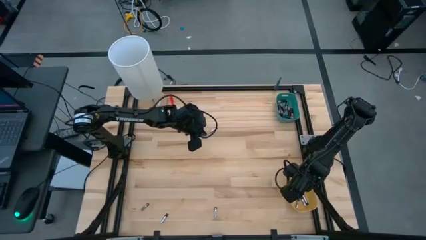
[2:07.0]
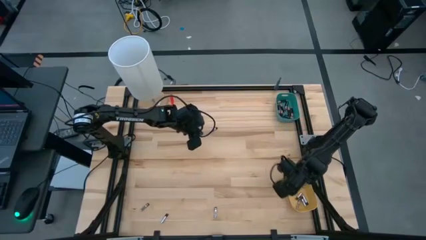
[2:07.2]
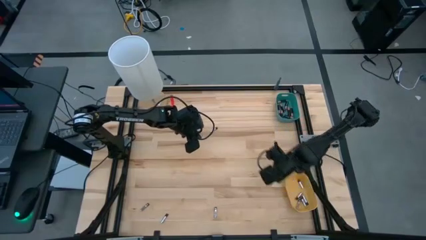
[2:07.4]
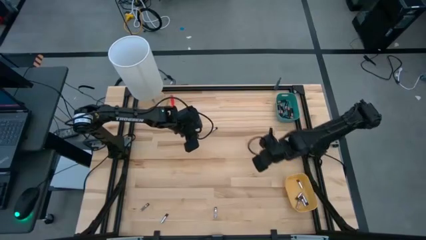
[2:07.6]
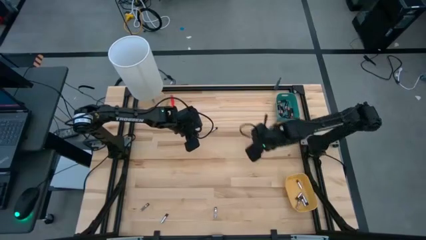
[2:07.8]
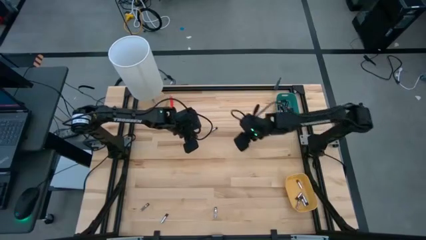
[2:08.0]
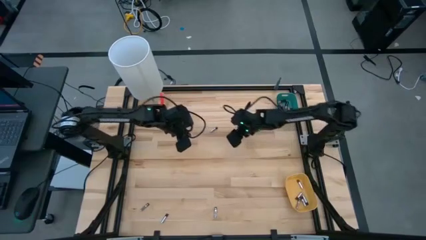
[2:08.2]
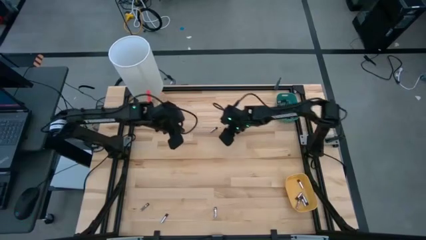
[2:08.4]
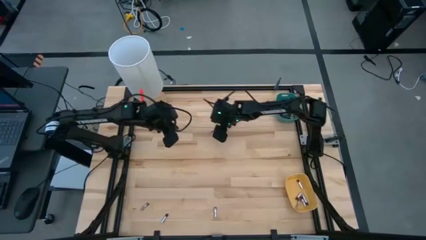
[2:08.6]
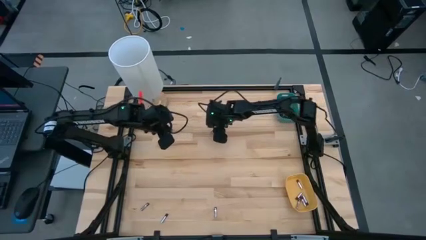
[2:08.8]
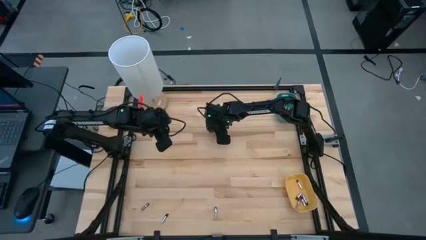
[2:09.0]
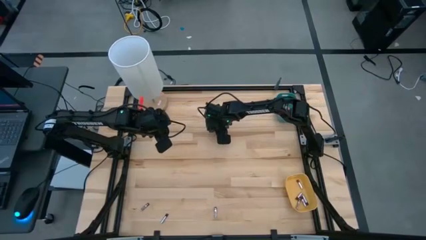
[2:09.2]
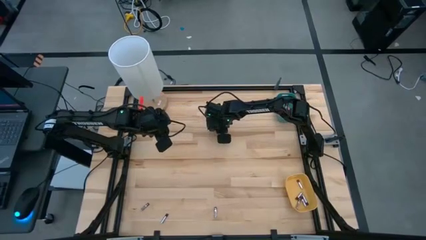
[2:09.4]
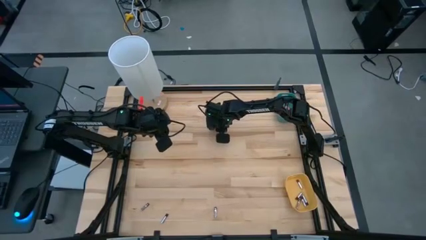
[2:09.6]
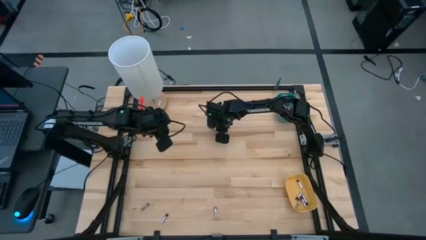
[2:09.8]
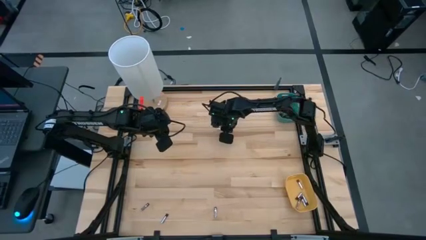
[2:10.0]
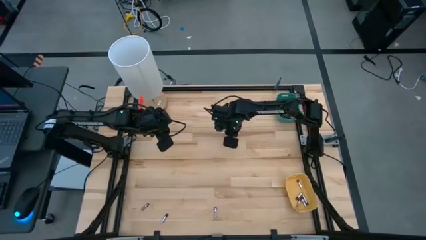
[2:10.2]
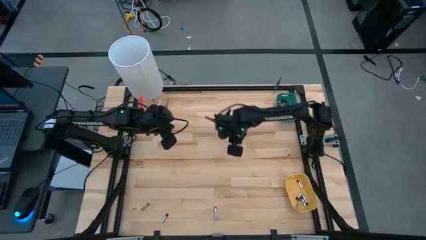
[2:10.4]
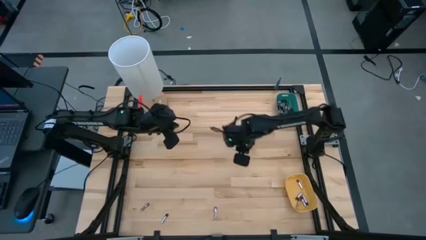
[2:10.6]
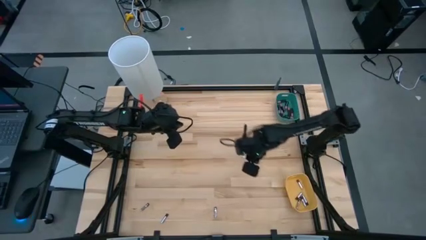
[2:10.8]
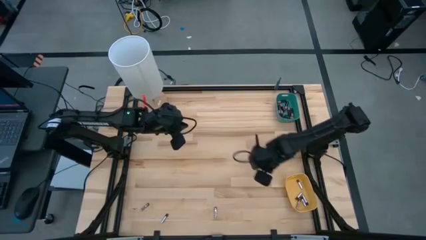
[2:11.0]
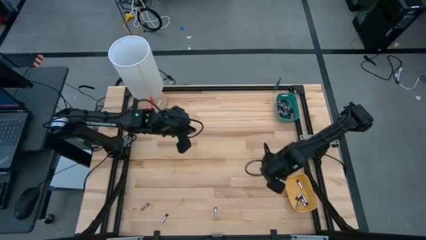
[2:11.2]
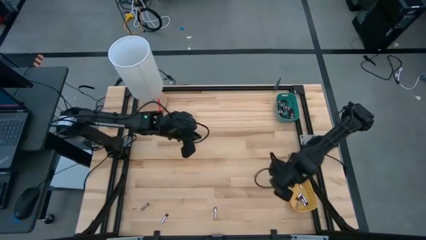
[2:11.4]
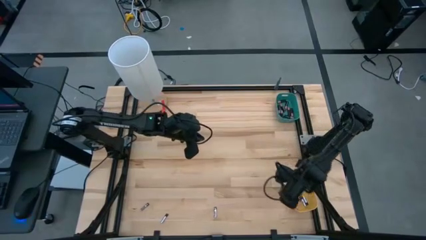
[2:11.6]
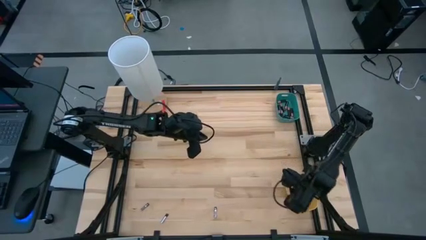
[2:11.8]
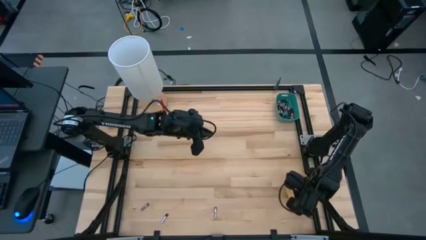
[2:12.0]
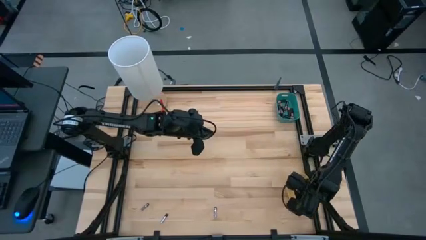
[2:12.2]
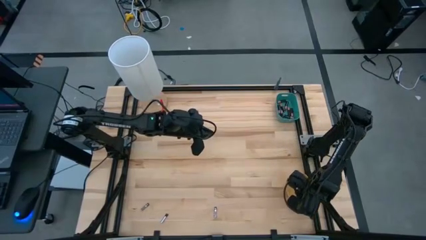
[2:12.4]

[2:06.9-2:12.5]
Task: Sort batteries
Put the silver battery into the yellow bin

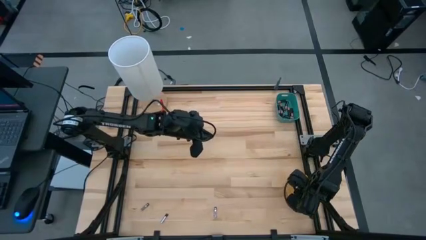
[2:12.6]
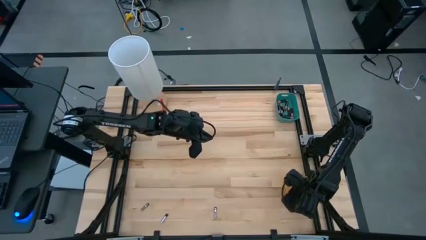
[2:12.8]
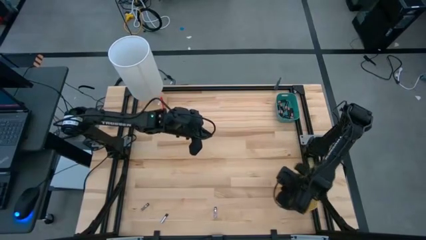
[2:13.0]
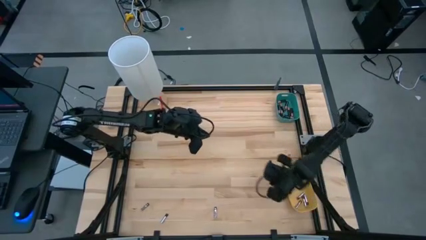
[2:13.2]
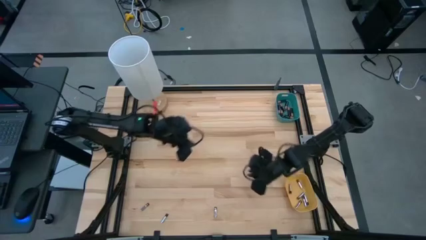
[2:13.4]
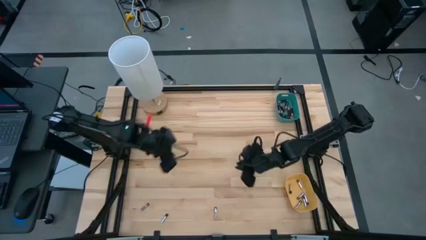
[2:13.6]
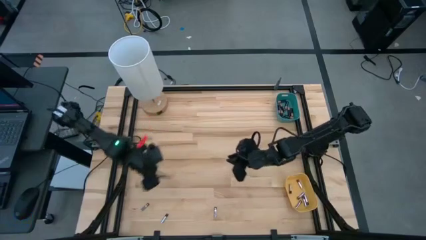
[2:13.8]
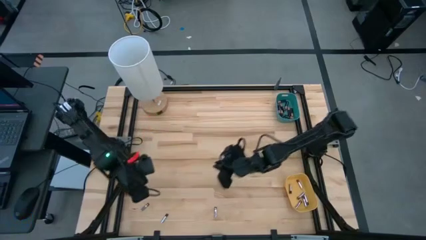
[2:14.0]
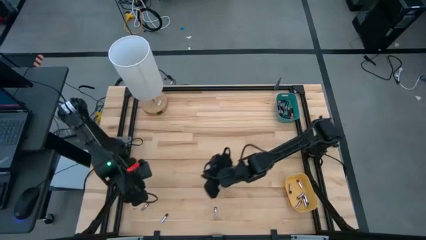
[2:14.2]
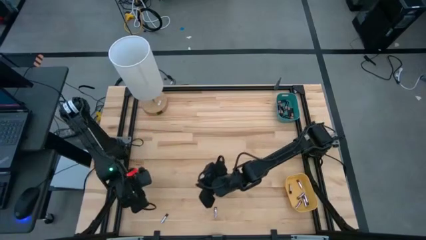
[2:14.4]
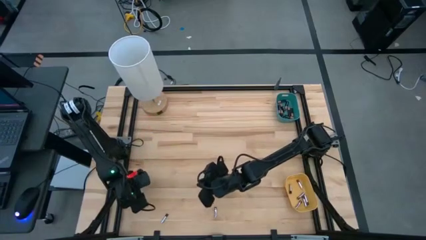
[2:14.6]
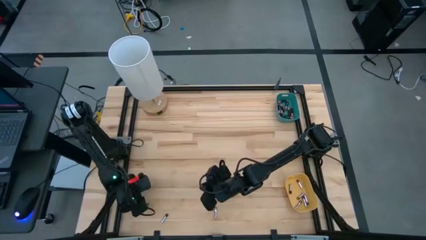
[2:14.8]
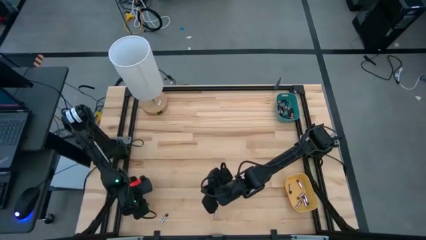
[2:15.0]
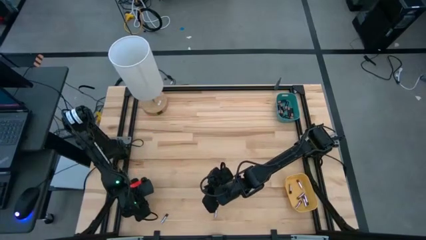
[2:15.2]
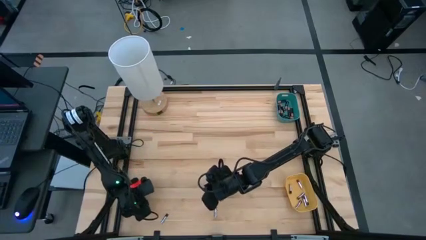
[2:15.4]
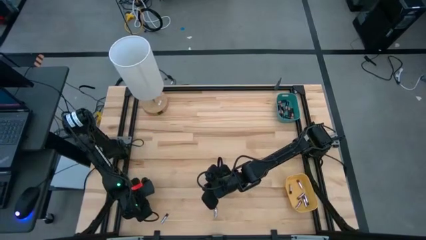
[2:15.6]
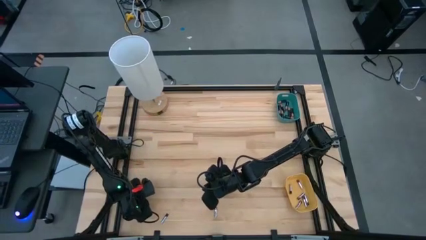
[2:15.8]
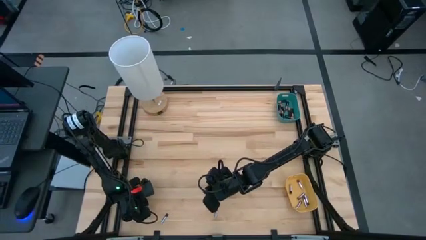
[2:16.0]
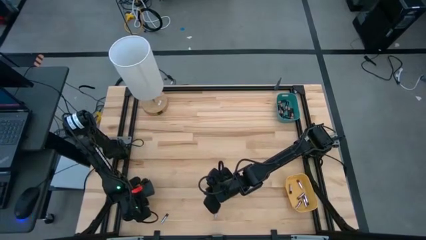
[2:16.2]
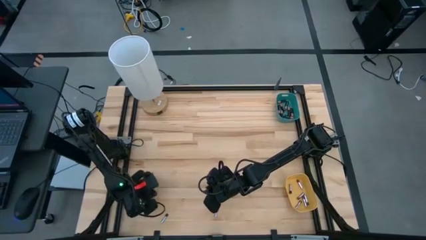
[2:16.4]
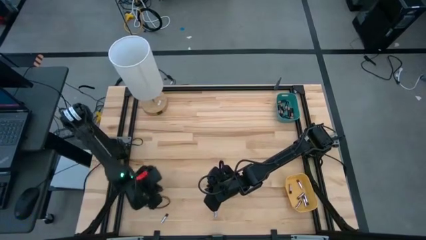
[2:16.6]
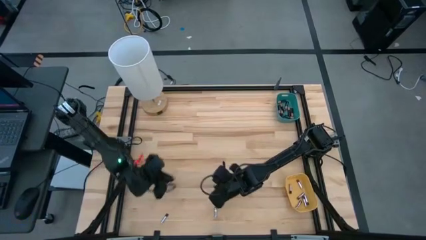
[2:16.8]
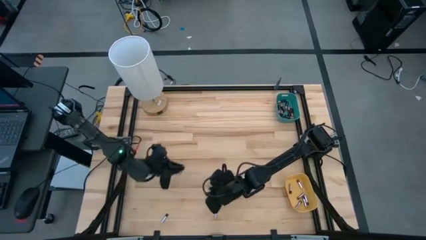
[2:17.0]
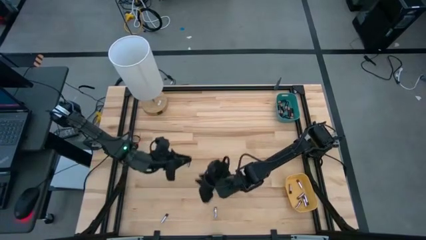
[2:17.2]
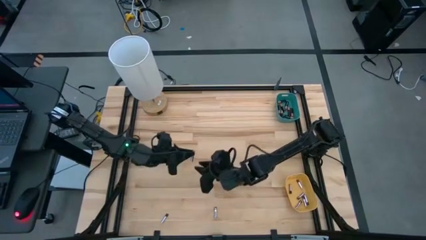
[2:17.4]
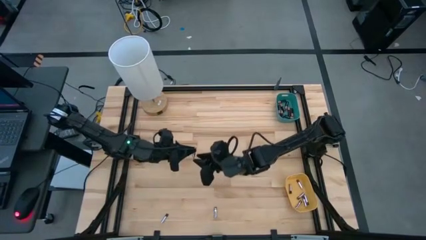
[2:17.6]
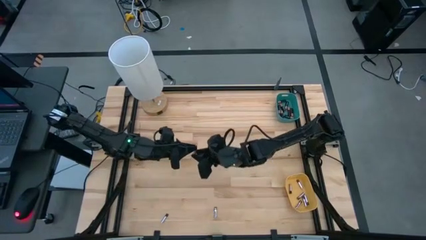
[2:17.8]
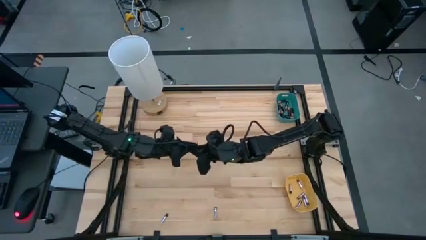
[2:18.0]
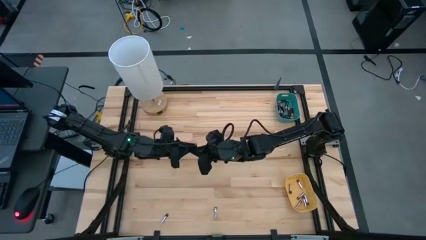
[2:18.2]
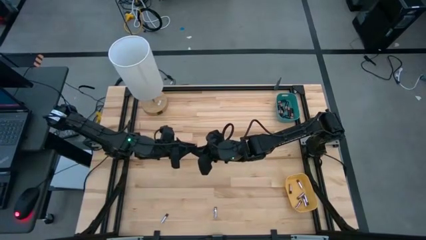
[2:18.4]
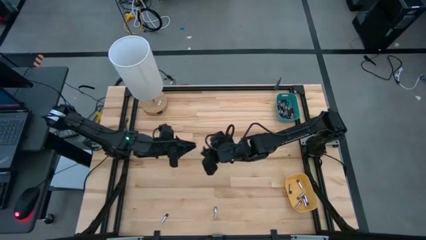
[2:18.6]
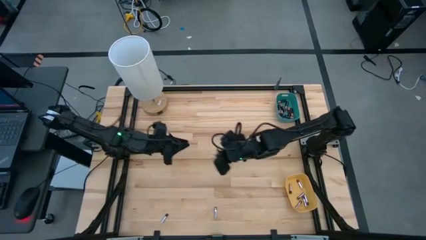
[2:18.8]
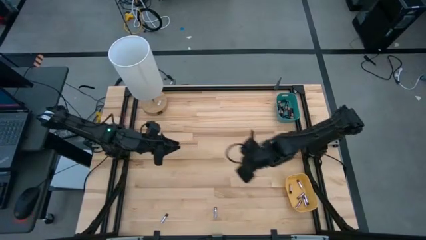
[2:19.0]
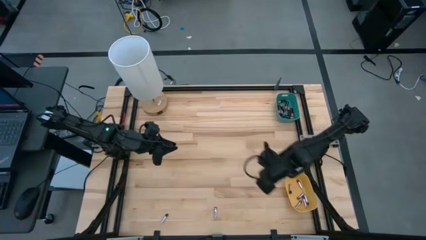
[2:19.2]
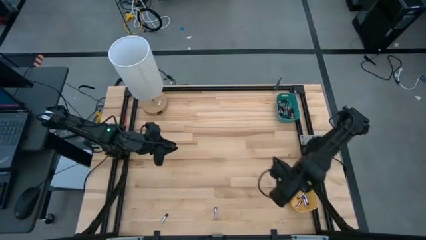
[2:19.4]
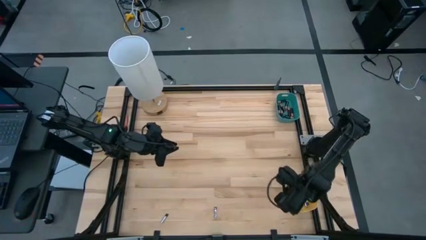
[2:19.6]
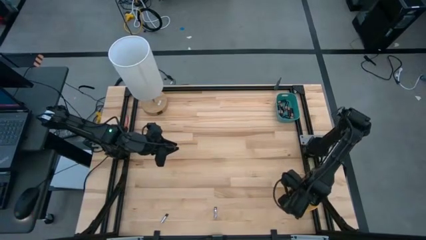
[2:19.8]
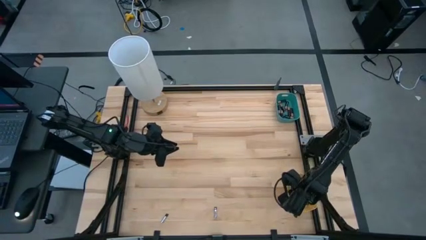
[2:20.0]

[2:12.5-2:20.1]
Put the silver battery into the yellow bin

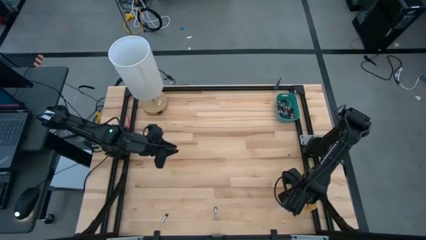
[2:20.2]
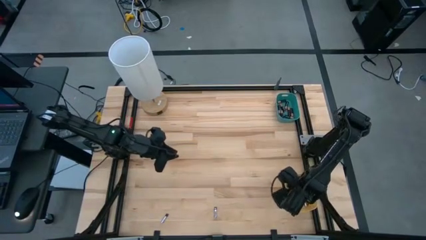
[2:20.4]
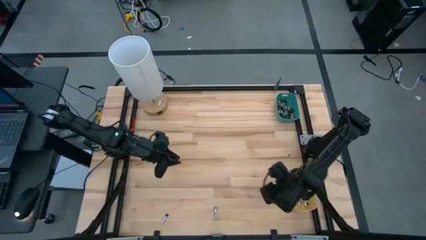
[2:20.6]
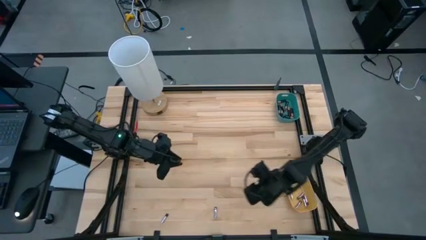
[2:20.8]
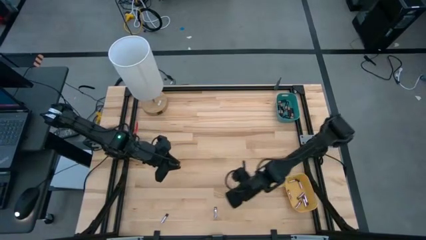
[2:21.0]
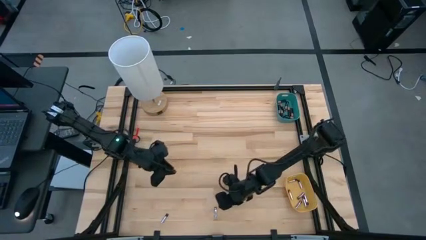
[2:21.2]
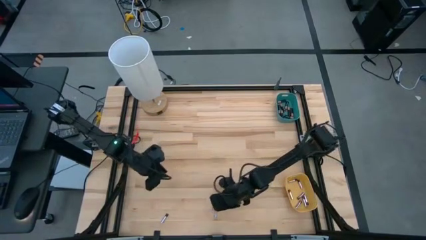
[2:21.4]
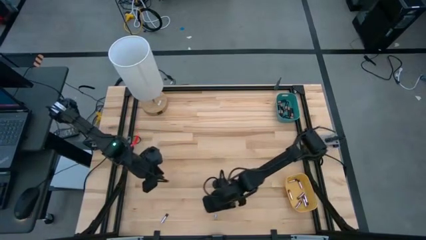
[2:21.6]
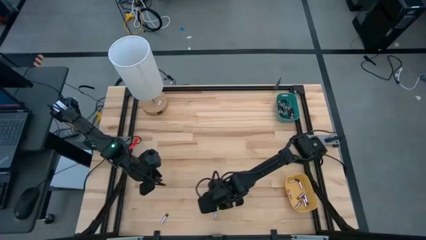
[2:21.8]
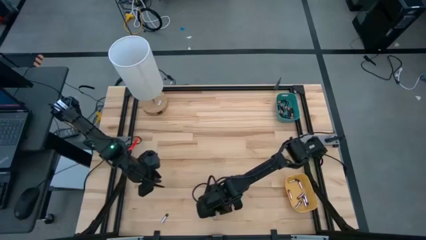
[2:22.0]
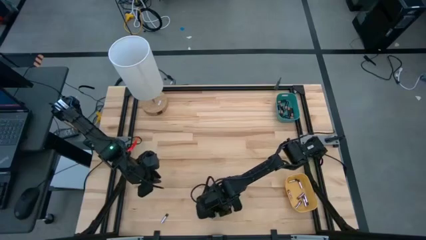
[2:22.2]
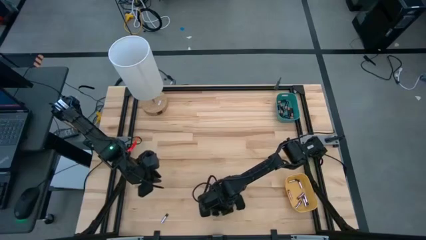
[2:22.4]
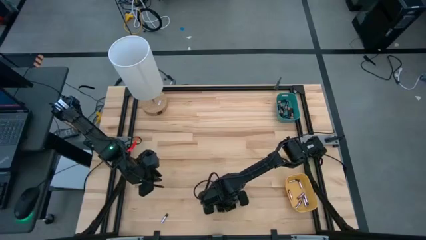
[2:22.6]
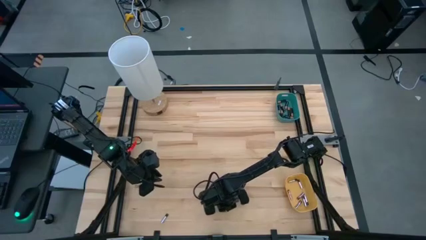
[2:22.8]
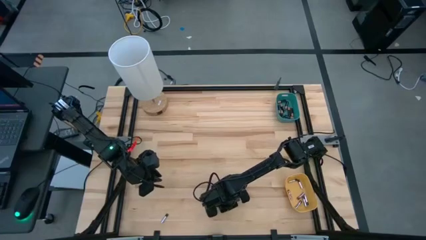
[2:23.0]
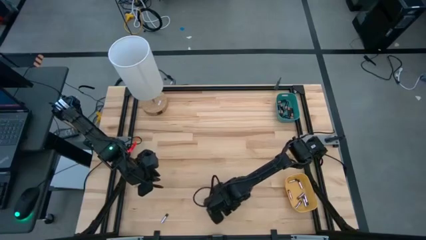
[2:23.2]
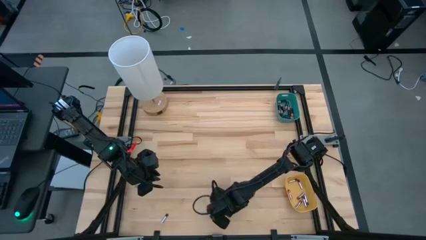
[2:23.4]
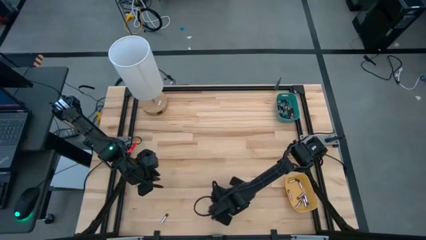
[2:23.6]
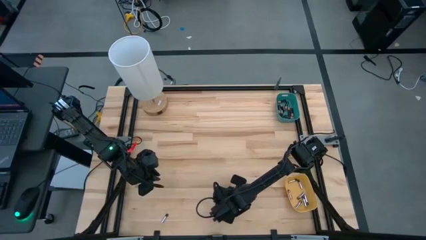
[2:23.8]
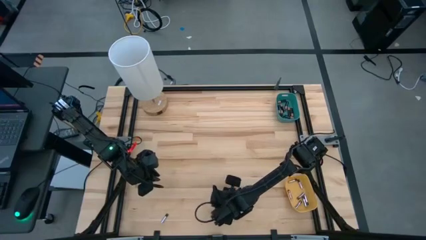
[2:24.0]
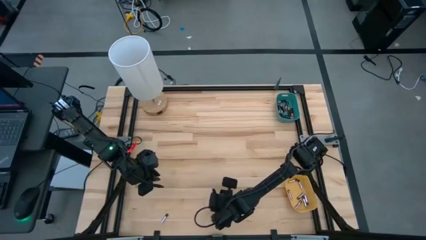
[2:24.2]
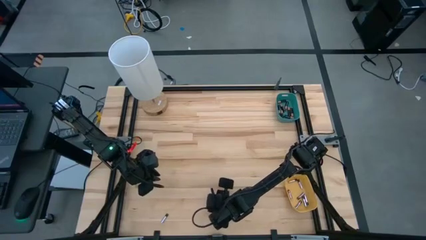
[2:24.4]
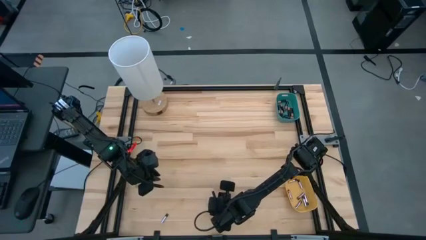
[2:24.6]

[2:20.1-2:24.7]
Put the silver battery into the yellow bin
